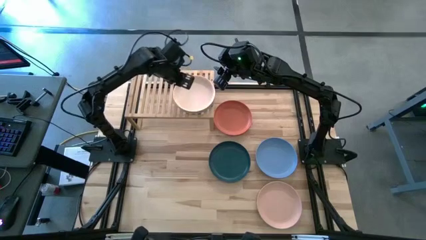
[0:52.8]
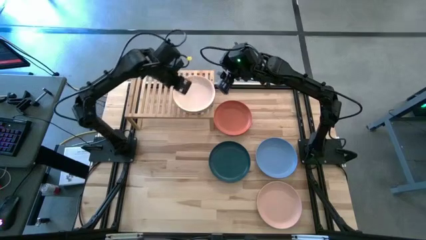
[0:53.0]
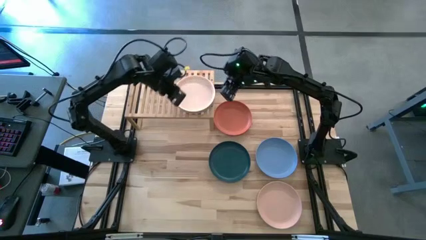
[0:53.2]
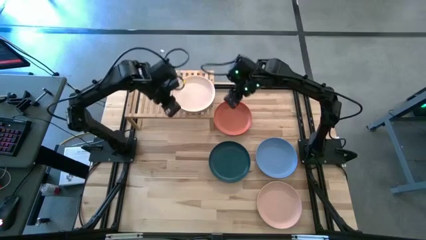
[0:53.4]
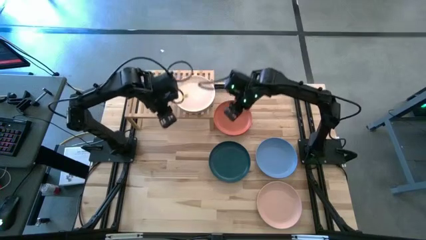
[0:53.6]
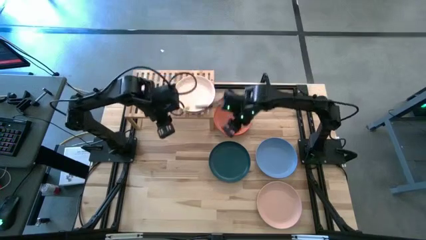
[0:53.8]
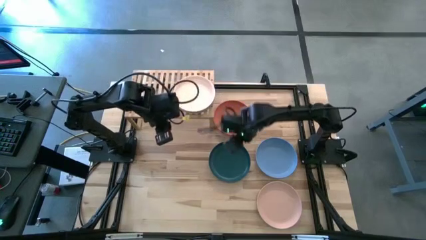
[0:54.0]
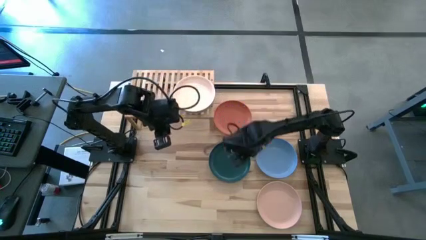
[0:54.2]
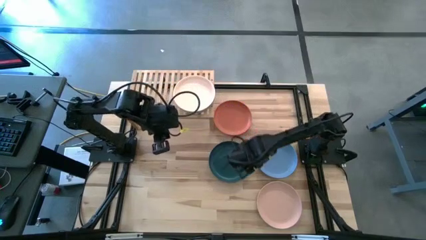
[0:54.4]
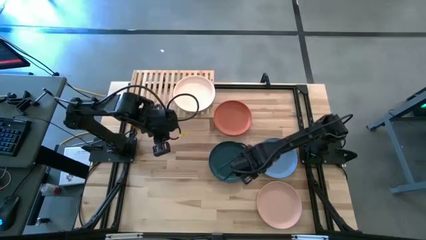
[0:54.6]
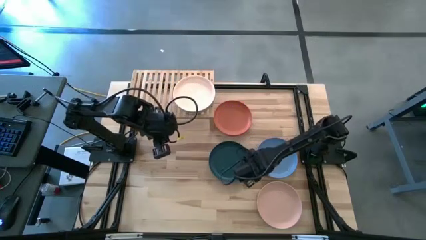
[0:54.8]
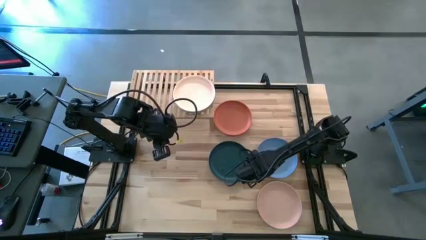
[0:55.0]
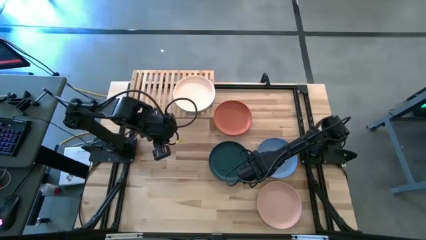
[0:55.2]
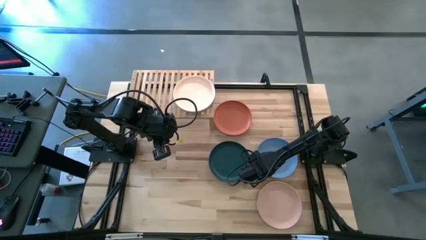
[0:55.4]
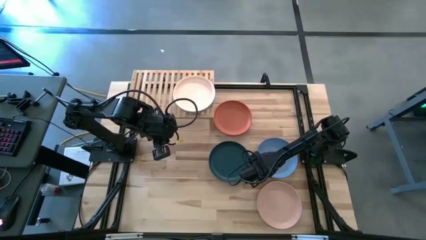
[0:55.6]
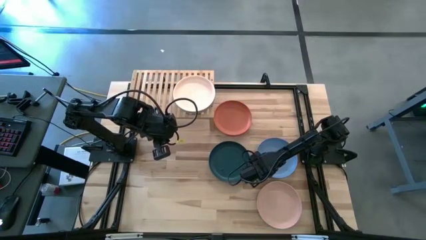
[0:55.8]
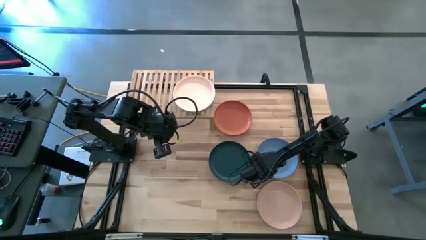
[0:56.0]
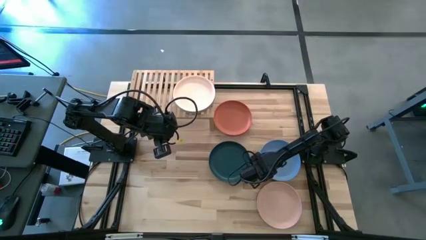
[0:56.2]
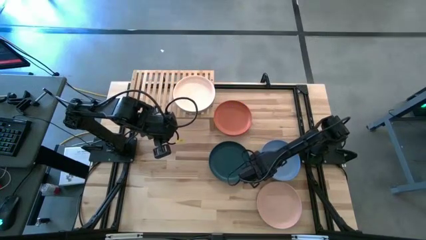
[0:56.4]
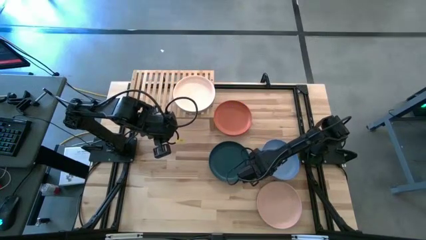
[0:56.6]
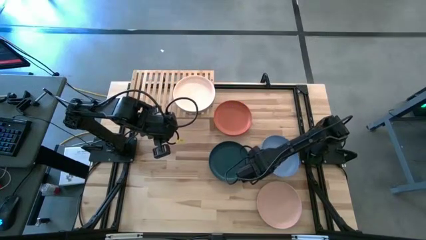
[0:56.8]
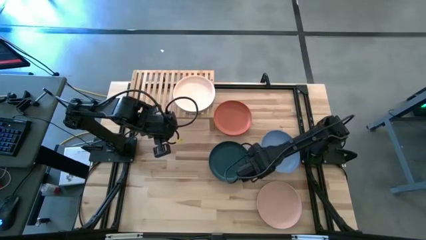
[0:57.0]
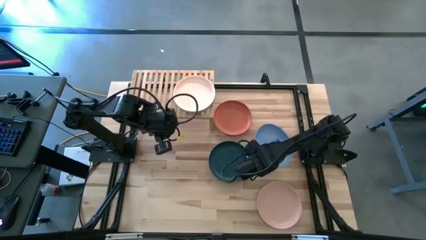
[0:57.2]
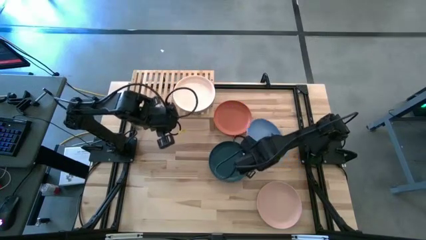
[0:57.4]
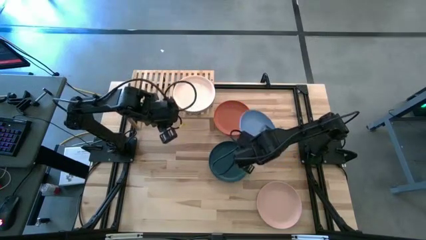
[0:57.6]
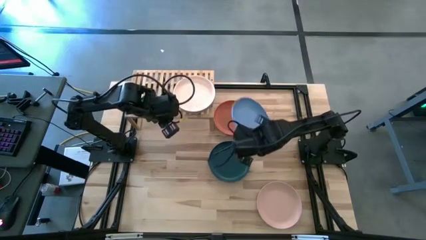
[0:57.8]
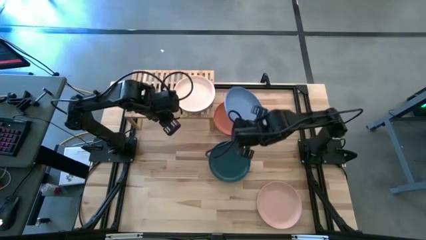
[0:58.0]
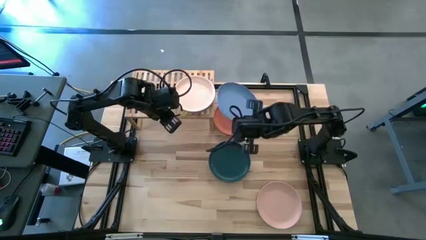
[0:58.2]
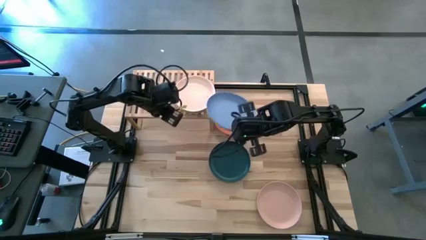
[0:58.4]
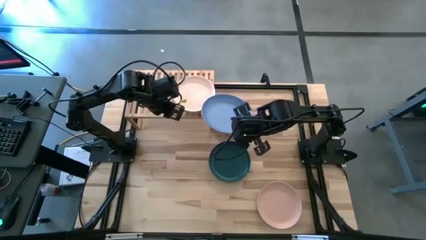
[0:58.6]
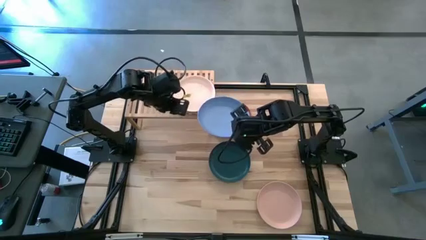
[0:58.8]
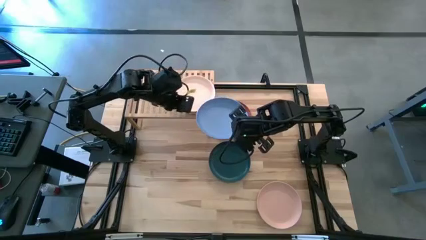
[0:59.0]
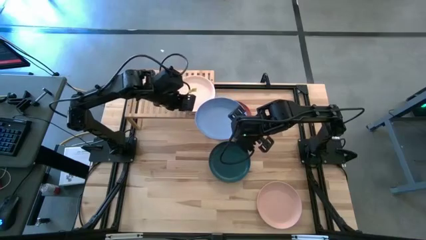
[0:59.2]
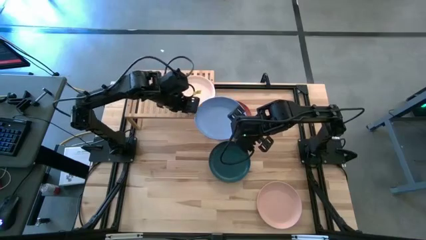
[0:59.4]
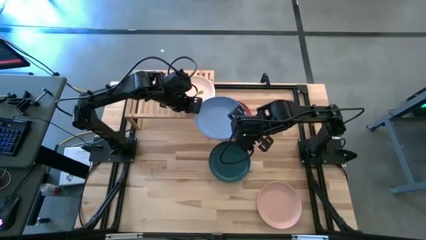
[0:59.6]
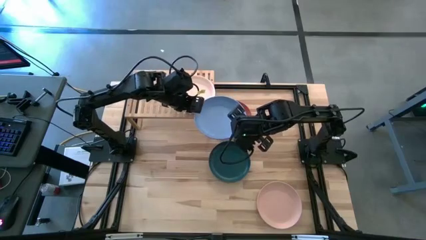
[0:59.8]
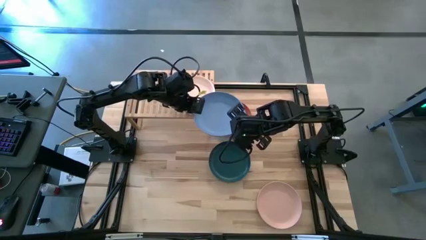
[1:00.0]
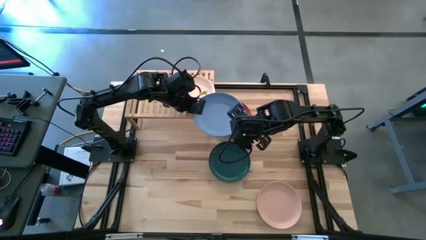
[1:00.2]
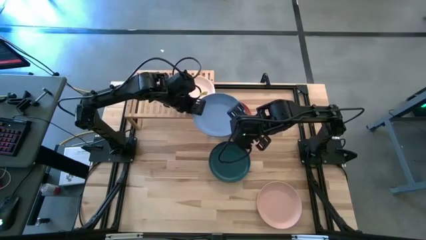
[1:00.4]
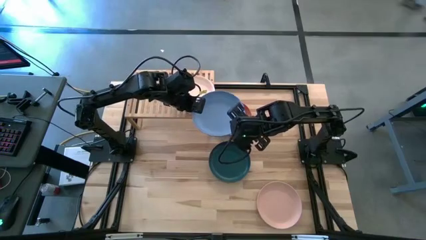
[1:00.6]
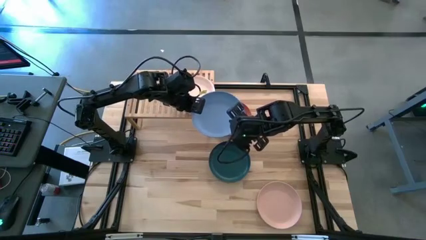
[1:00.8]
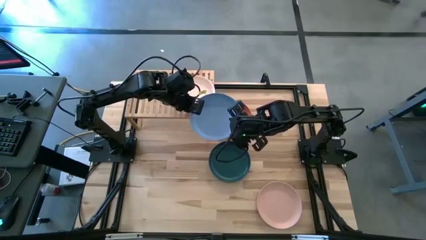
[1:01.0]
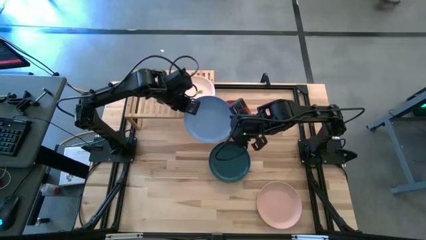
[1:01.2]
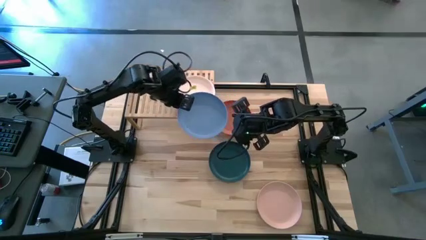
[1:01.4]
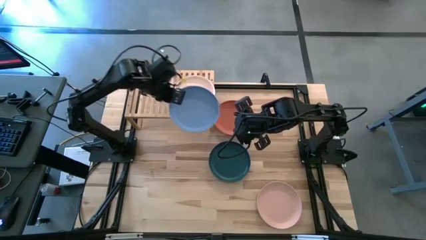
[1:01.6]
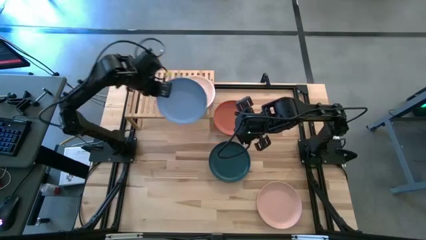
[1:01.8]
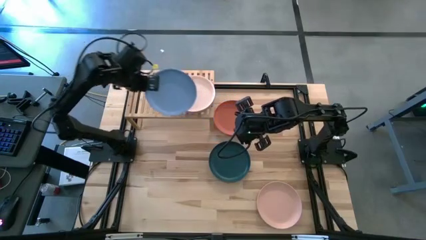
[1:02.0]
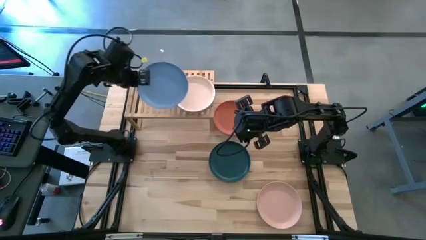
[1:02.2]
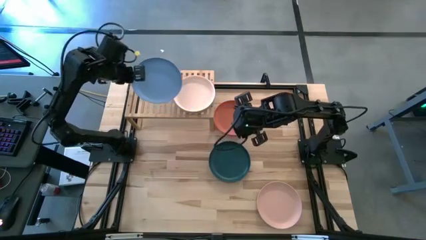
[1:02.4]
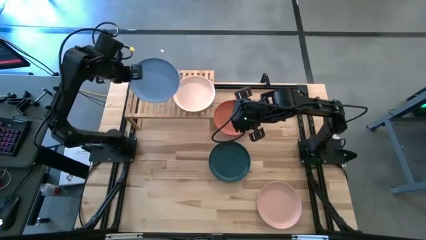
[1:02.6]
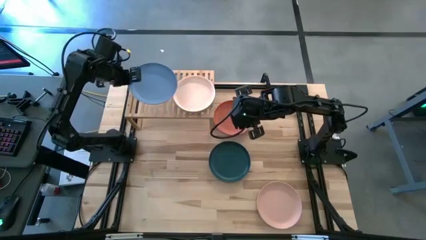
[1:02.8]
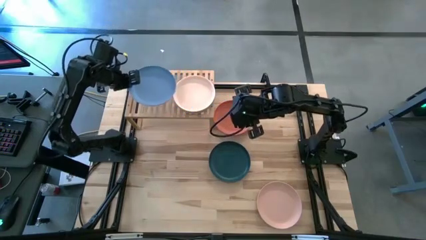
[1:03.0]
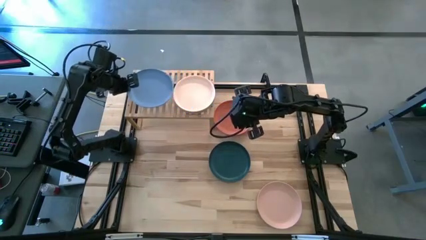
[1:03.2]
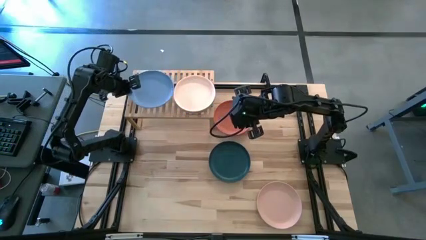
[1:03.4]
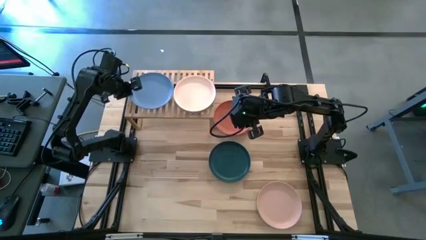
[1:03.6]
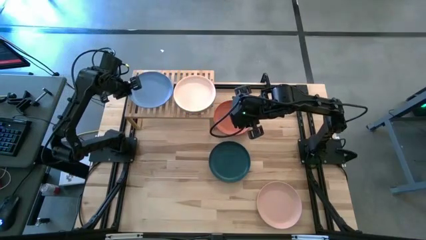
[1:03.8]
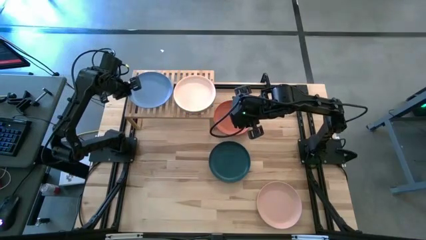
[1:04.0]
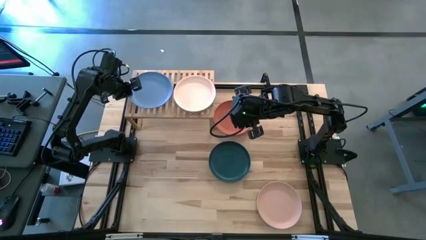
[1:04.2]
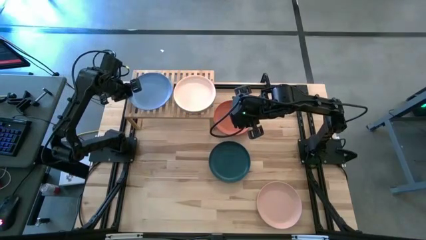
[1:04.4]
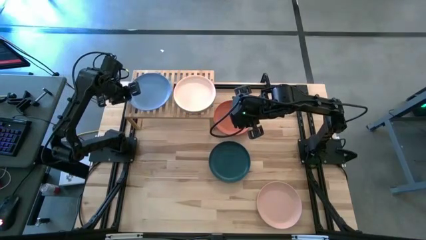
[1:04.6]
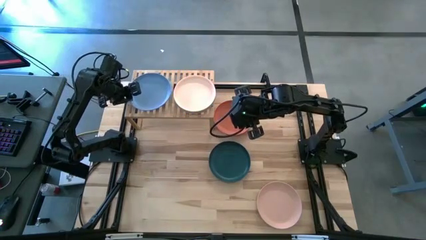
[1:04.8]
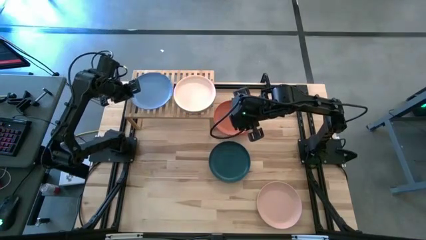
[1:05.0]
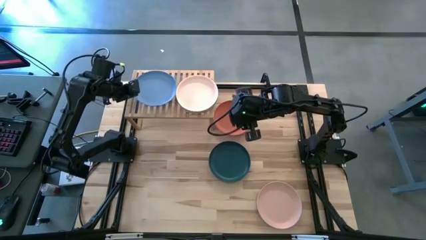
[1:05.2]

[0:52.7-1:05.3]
Task: Place and stack plates onto a shelf
Put the blue plate on the shelf
